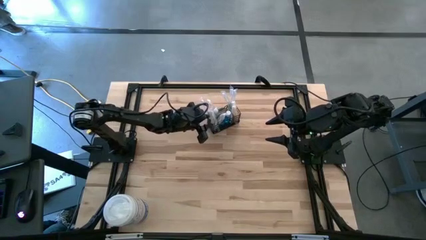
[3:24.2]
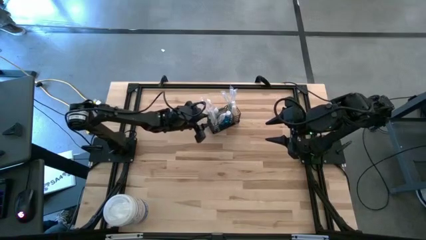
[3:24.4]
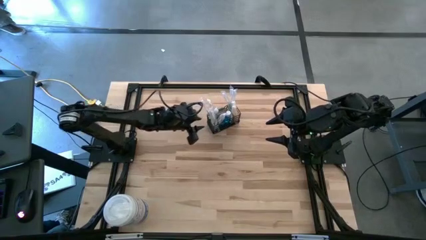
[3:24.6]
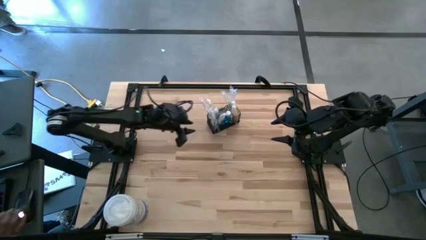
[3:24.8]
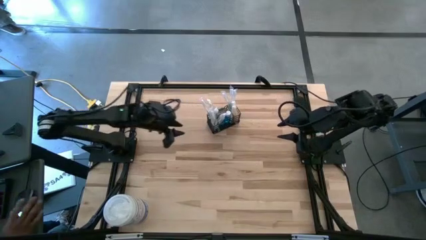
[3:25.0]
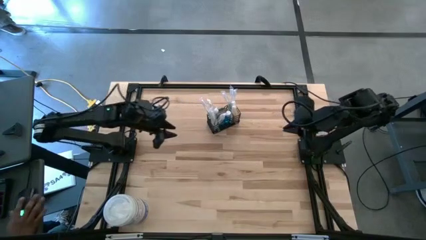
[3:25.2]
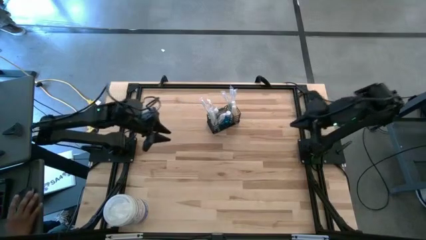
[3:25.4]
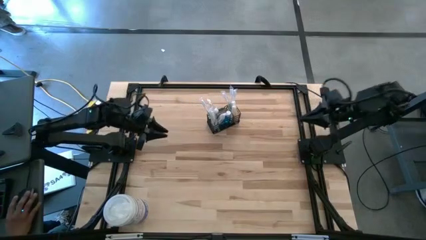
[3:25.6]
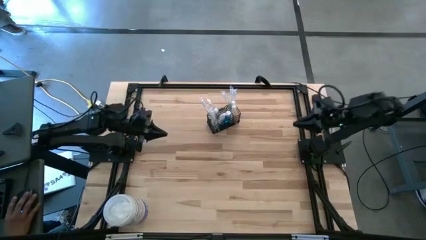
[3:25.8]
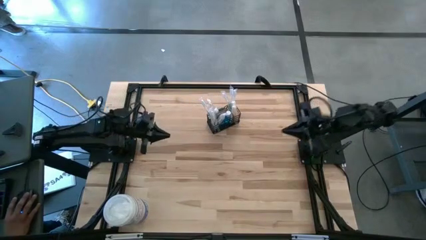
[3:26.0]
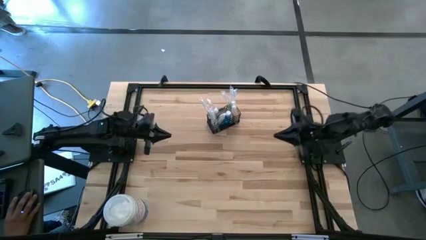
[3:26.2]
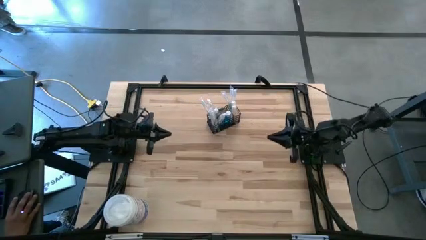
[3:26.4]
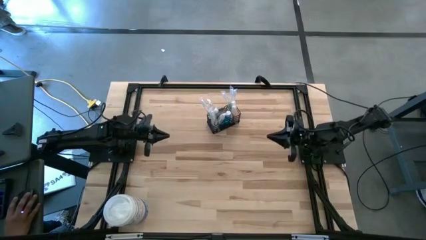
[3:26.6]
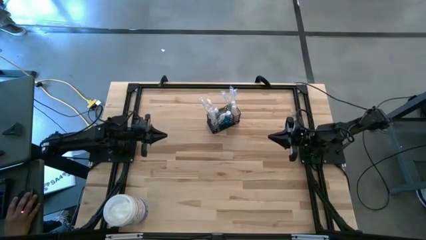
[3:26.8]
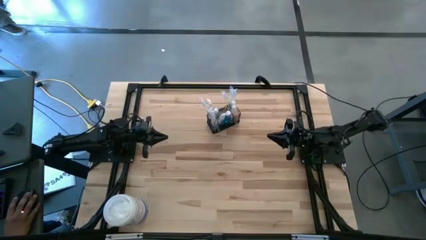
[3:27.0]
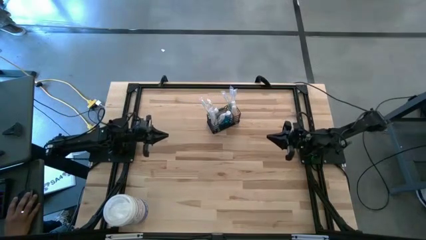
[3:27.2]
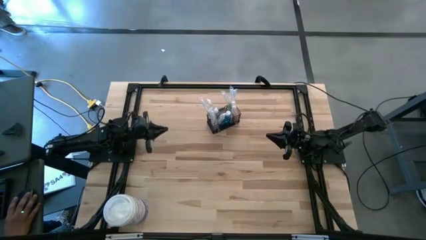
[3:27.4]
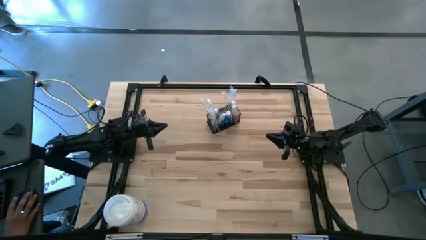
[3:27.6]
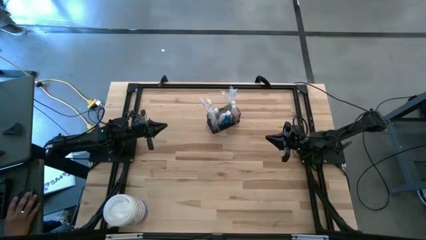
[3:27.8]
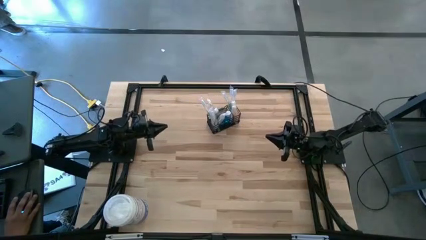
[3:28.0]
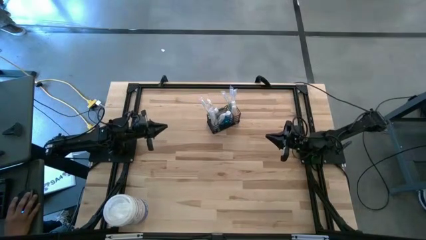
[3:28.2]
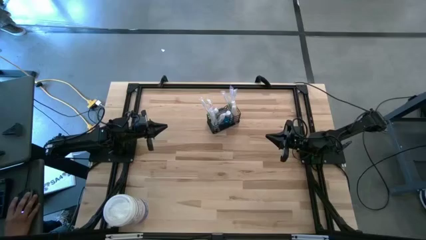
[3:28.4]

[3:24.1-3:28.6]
Task: Pick & Place toothbrushing station
Return to Home Position

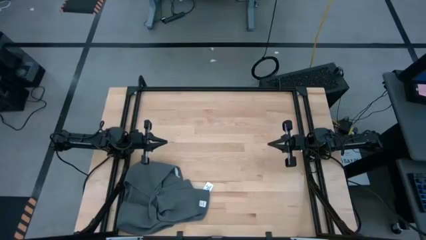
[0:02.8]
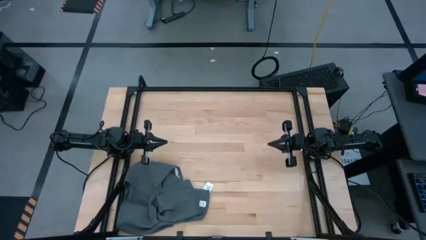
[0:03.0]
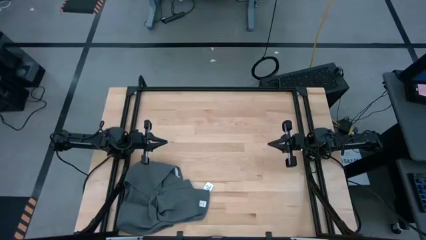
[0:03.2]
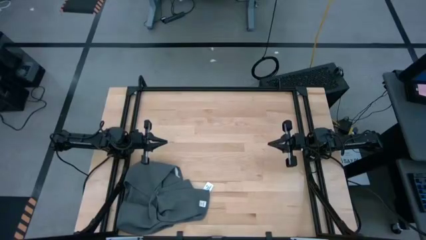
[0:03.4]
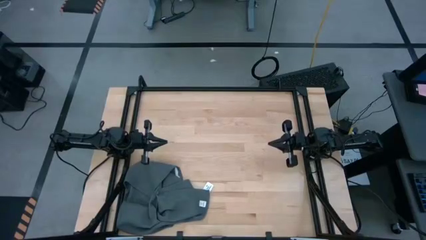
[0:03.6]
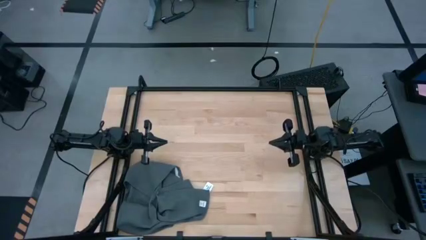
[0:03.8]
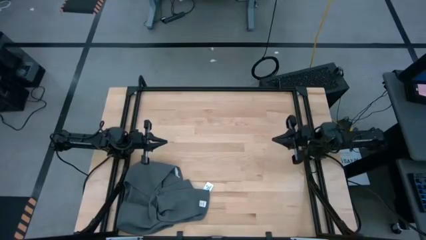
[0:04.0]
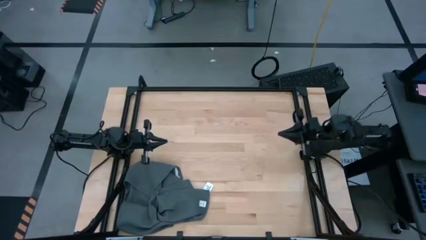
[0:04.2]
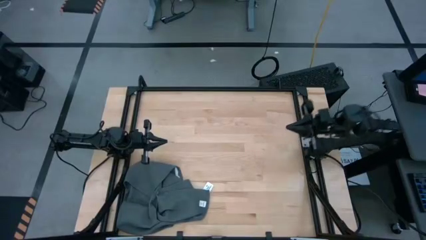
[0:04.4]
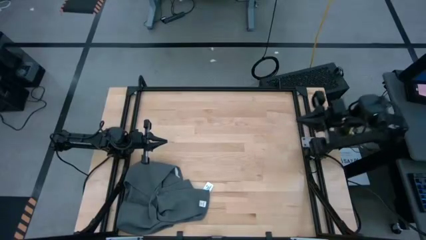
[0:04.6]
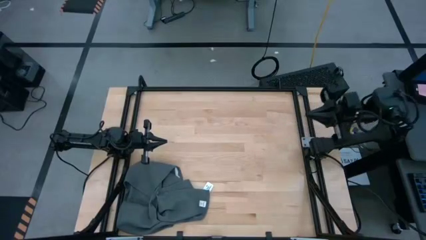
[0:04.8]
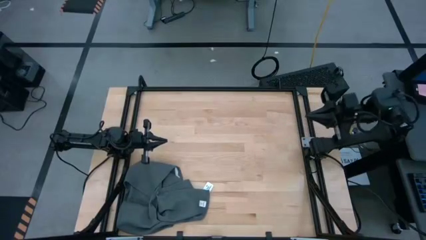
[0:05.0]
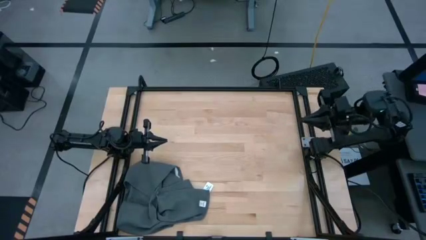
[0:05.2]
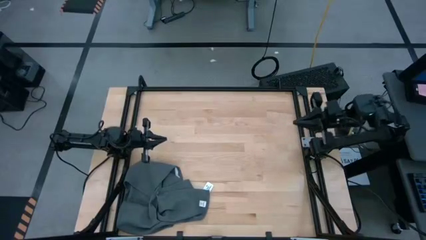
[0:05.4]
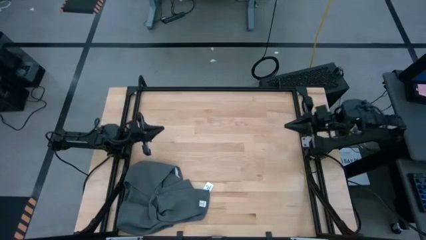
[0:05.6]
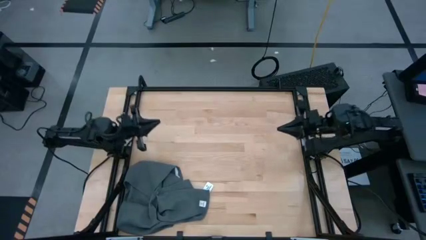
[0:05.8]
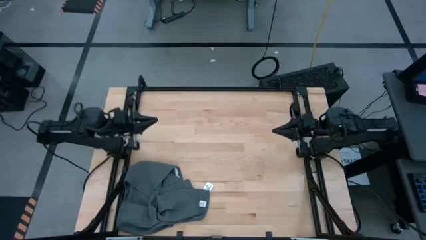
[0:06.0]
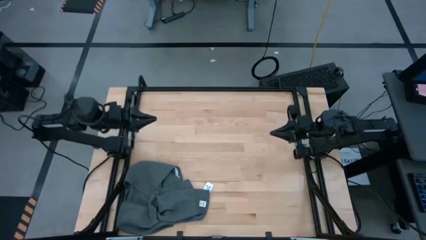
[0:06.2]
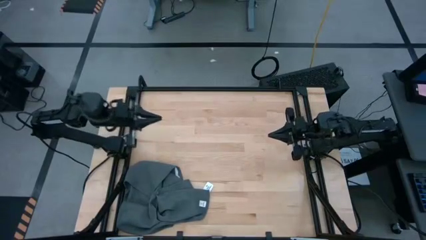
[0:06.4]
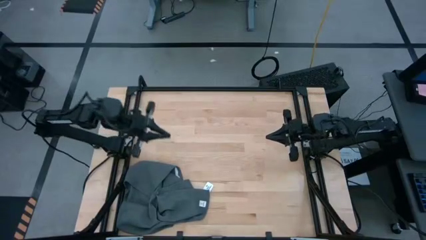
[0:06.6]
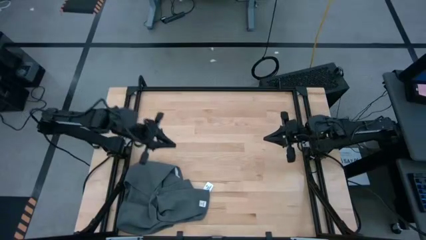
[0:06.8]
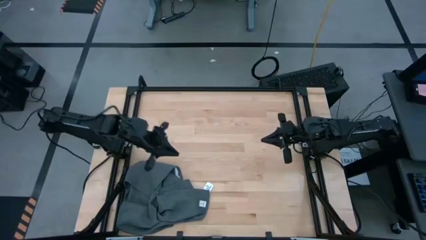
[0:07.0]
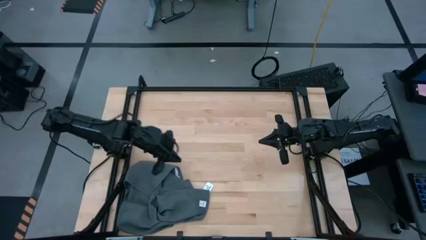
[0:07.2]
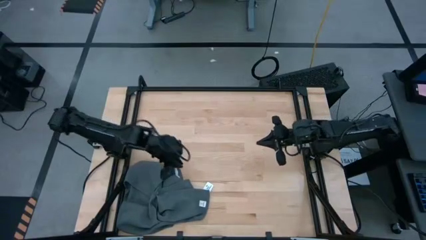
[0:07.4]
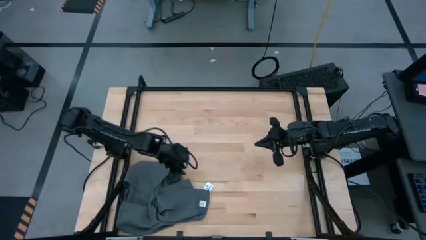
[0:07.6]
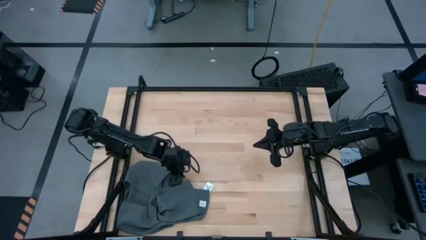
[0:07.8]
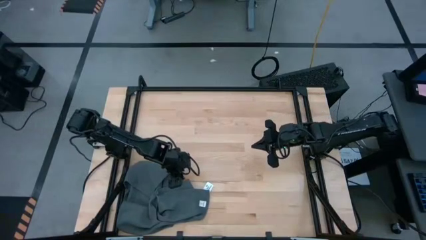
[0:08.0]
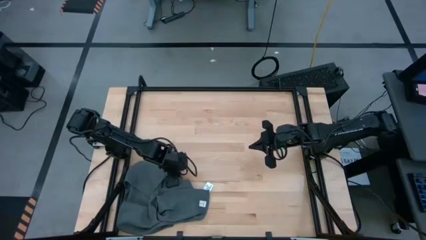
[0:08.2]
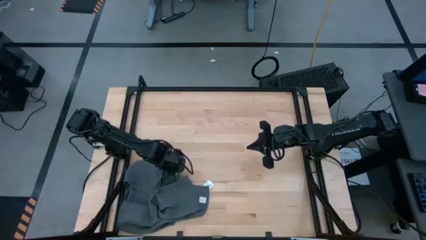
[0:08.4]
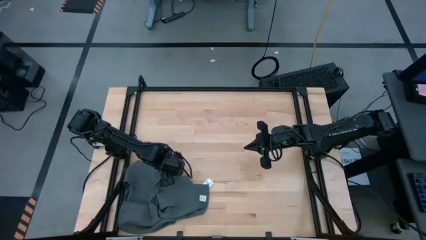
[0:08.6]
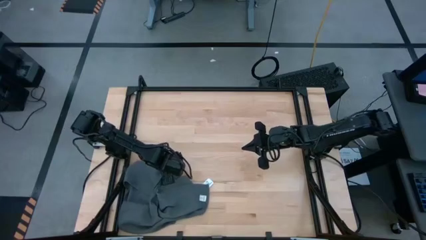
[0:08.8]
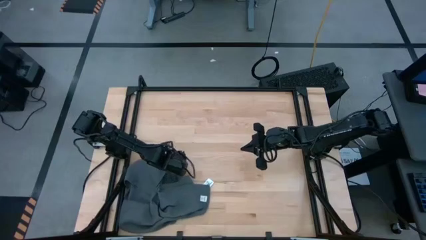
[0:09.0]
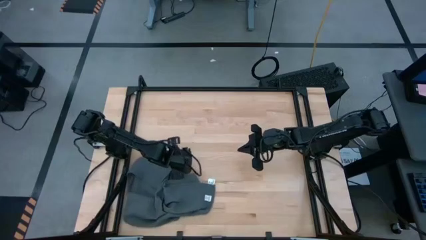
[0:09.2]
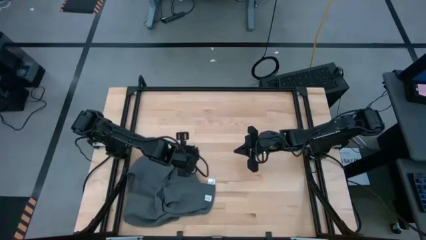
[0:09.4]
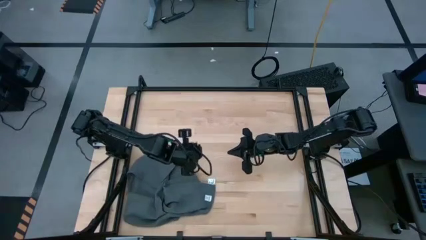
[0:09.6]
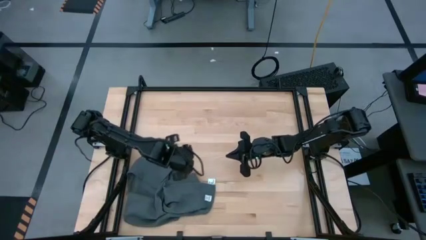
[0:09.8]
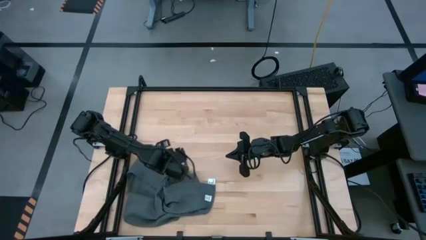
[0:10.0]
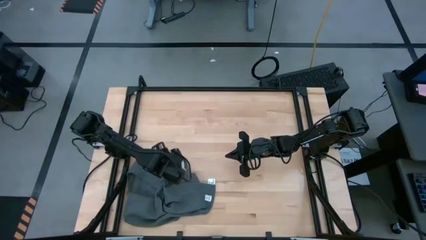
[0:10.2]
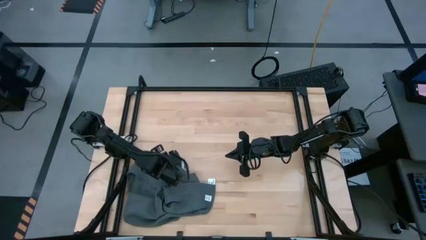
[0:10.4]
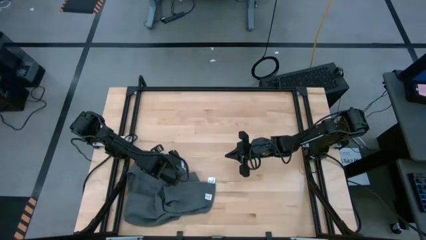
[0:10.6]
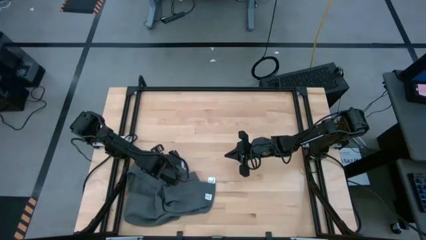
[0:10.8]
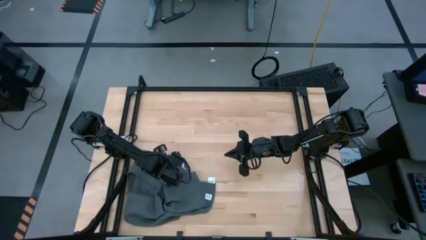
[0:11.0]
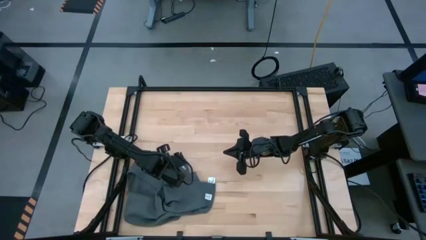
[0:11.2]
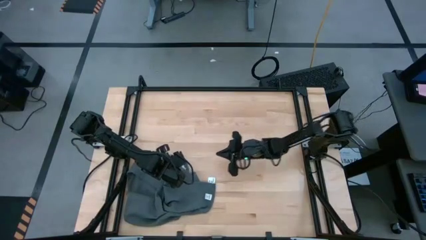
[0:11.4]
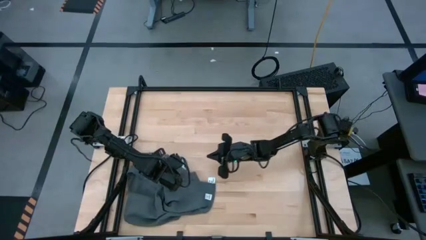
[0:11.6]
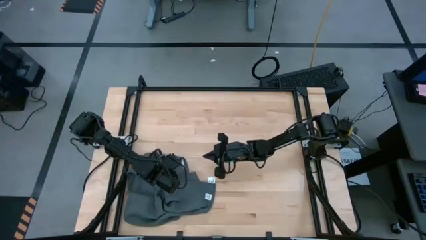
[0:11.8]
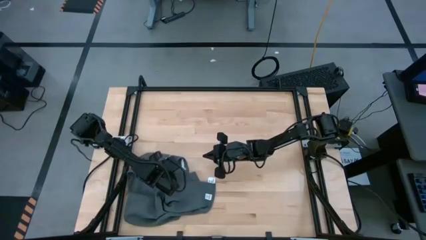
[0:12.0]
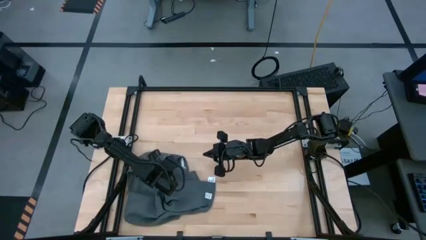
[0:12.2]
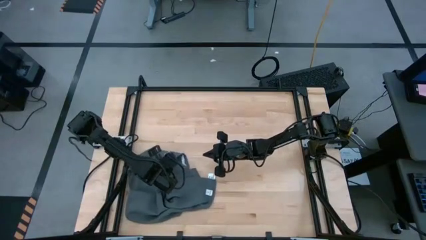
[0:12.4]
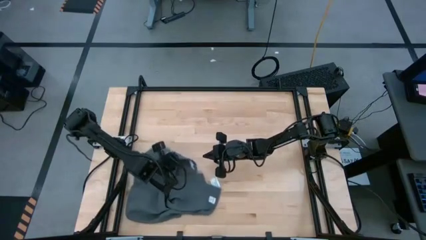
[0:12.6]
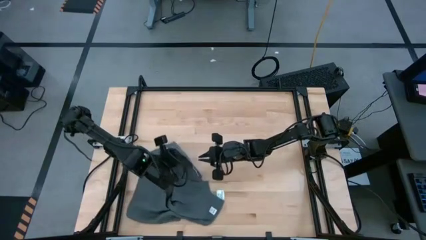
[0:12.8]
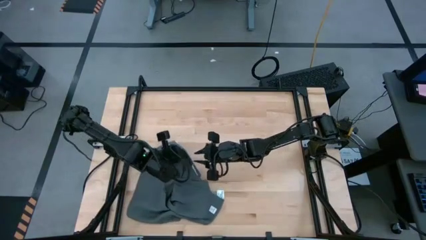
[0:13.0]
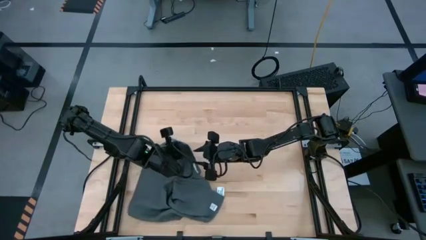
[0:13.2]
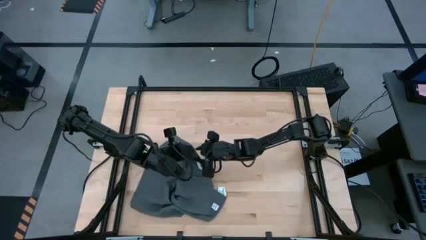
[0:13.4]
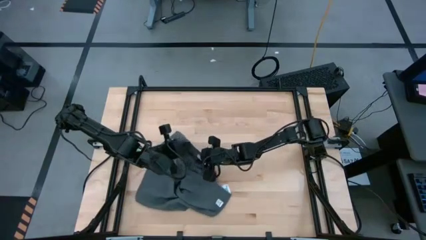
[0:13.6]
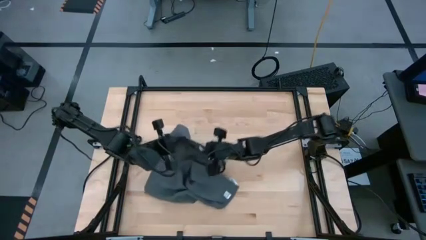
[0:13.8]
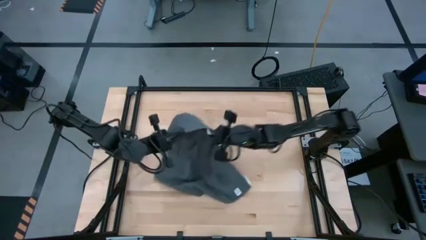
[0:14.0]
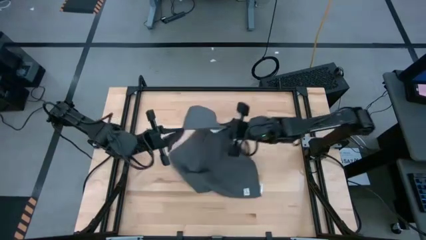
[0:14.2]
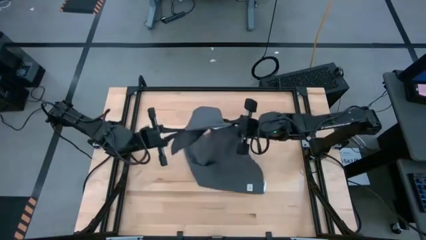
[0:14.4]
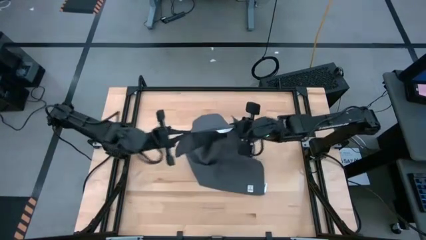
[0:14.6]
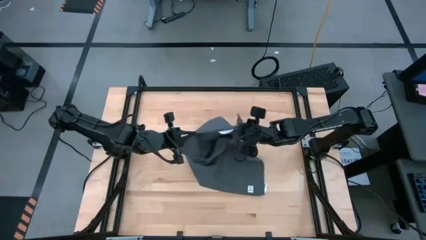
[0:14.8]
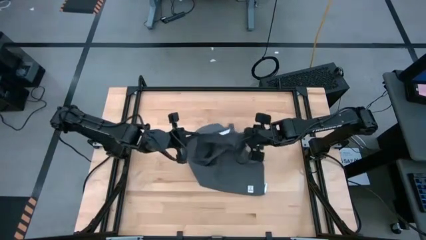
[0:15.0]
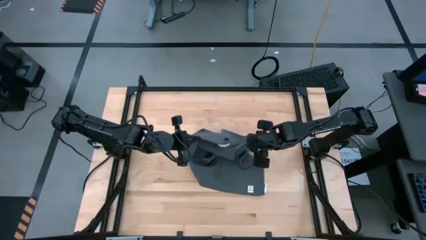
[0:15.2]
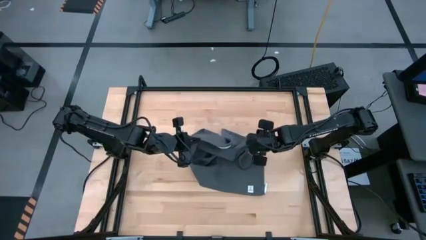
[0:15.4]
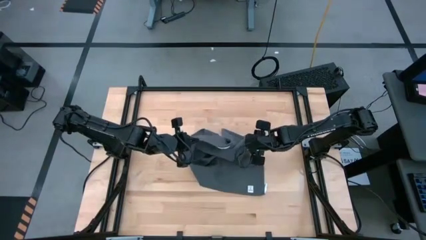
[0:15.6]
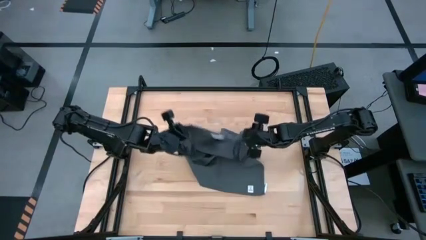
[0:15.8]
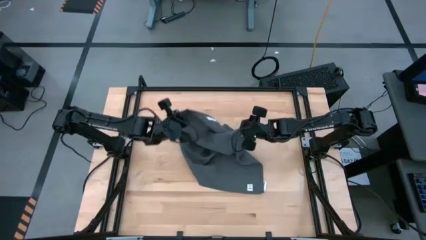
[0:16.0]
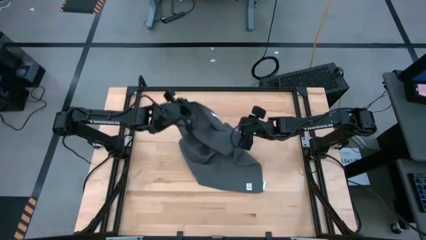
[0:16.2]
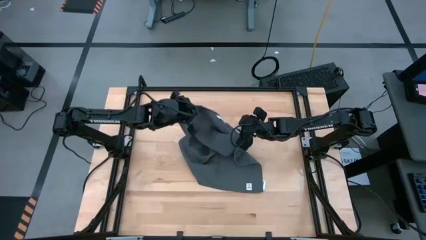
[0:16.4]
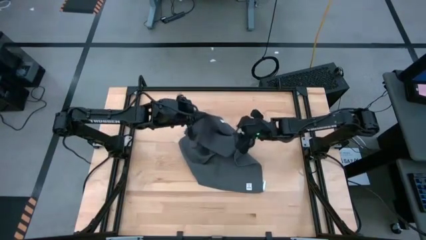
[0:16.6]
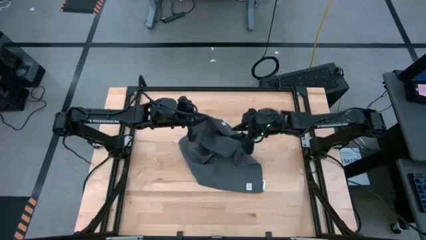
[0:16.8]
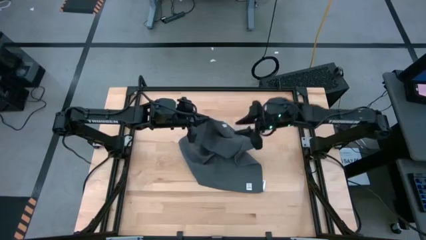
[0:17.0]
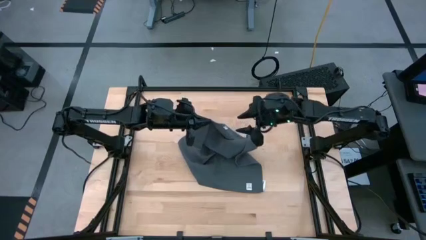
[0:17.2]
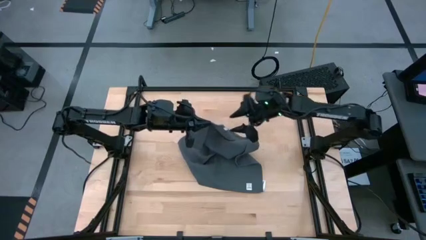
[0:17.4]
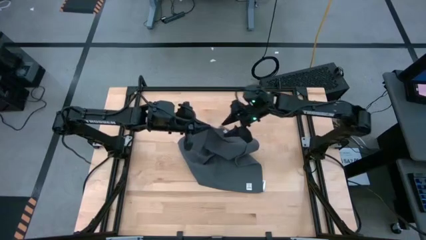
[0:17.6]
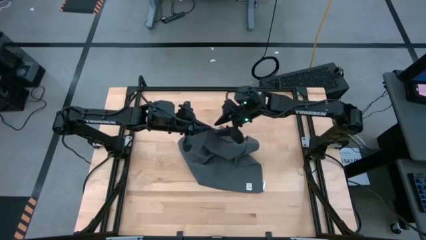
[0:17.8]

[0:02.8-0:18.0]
Task: Roll towel
Fold the gray towel on the center of table
